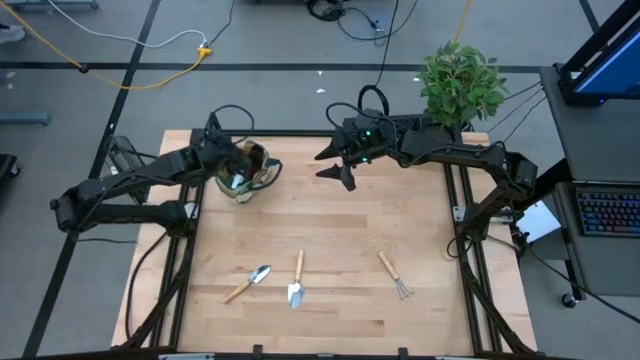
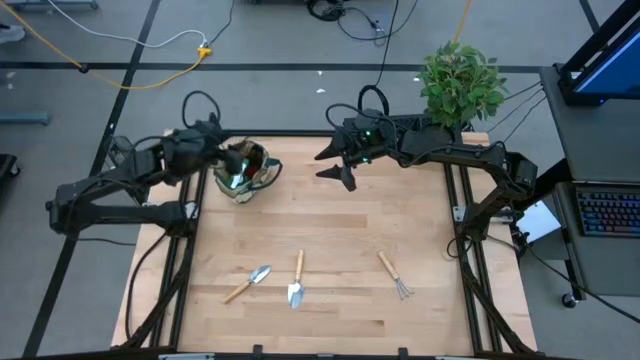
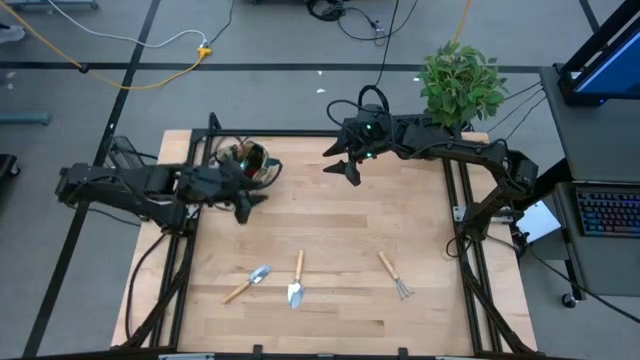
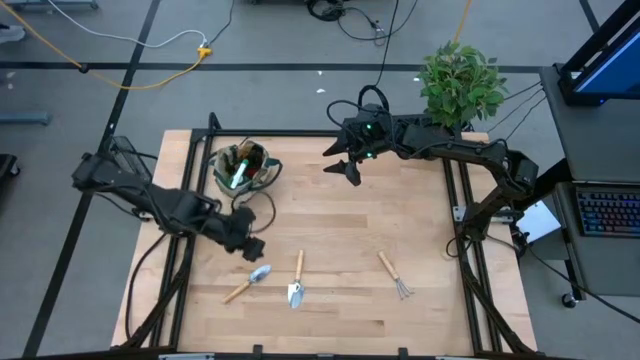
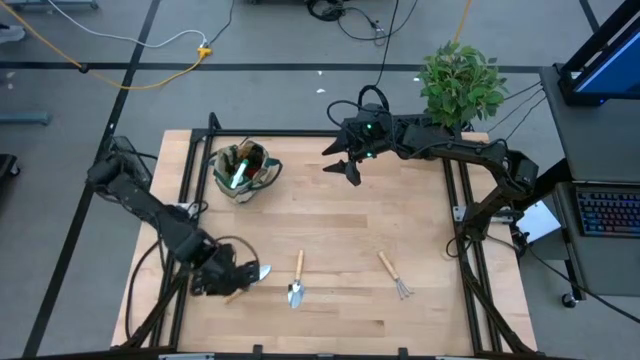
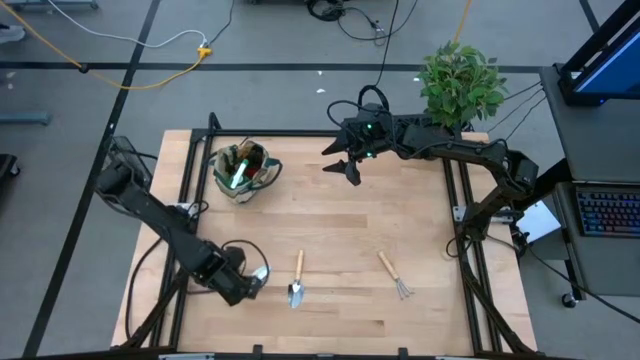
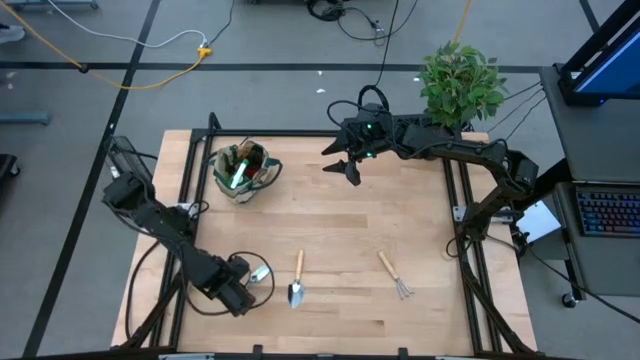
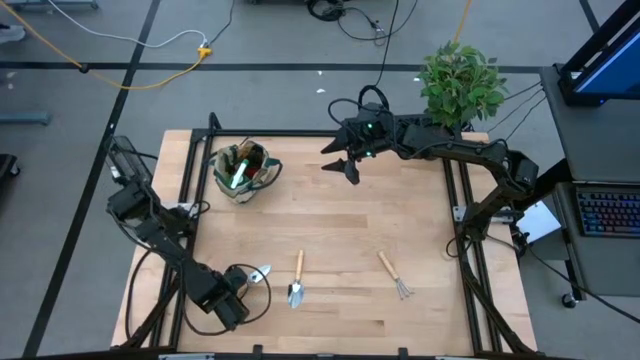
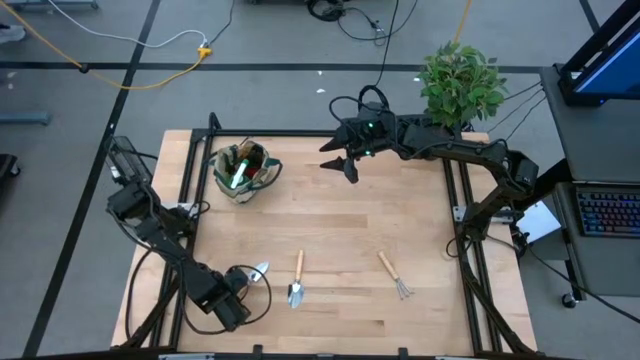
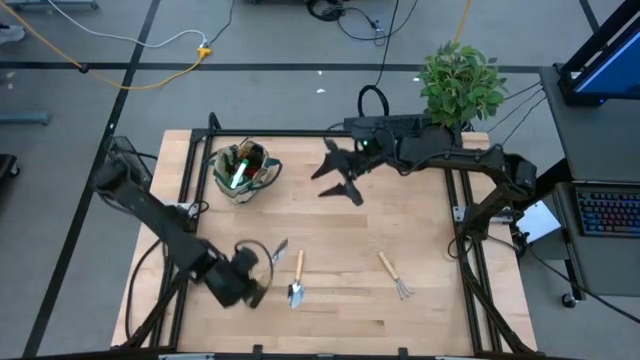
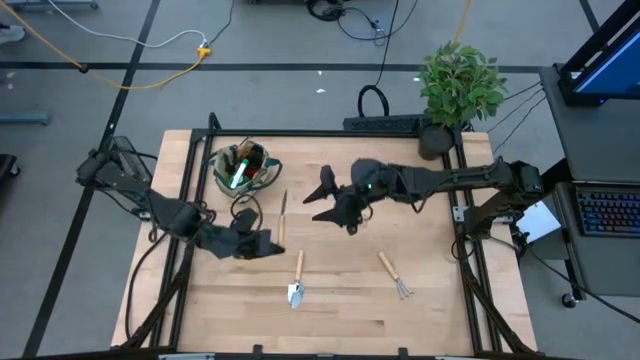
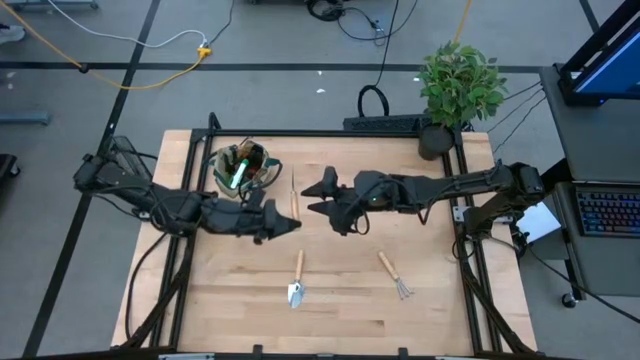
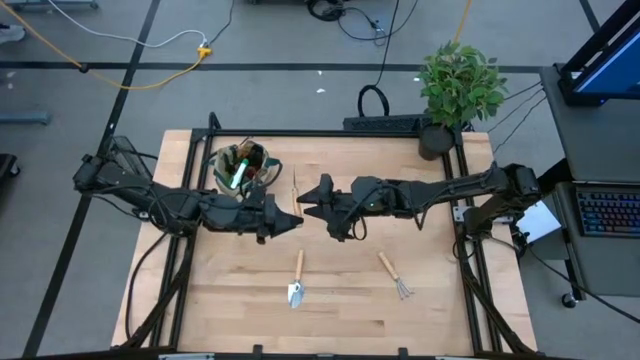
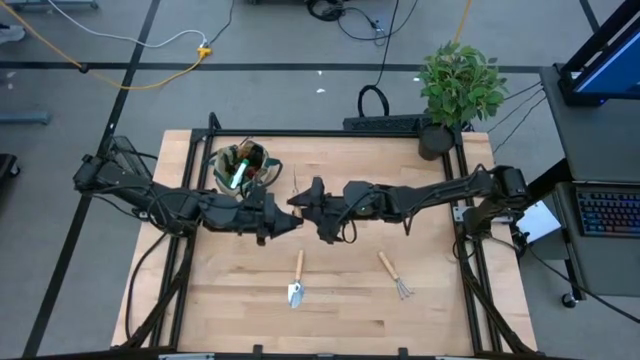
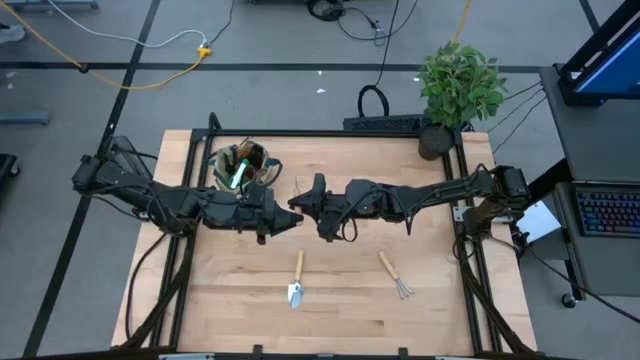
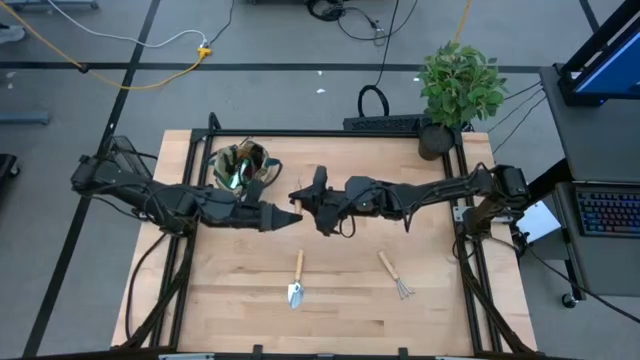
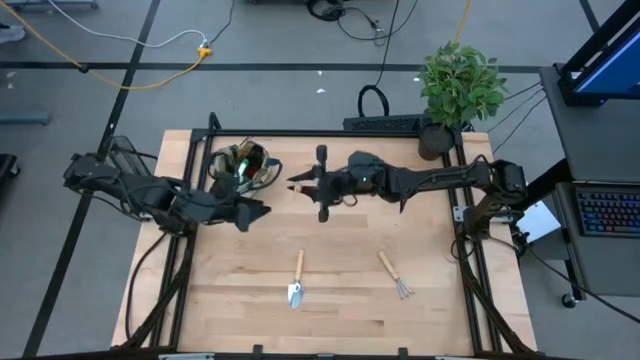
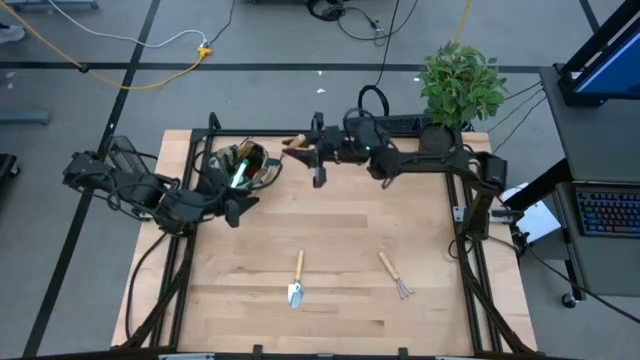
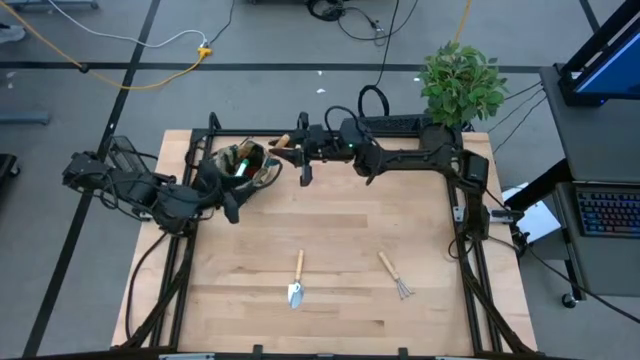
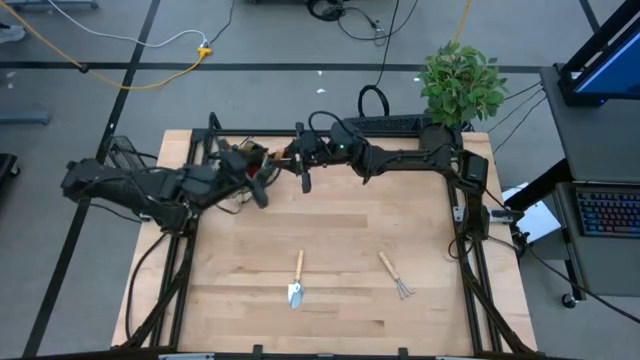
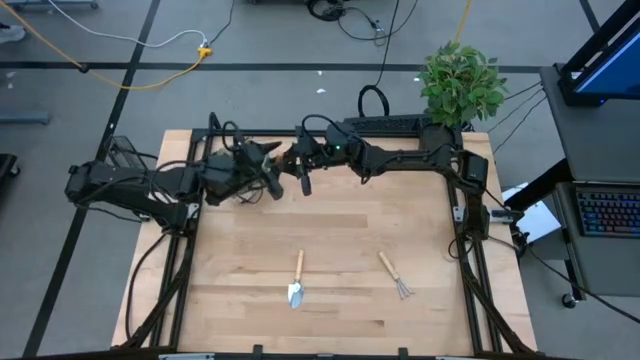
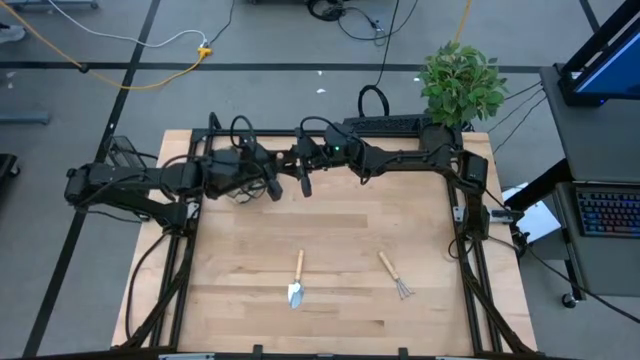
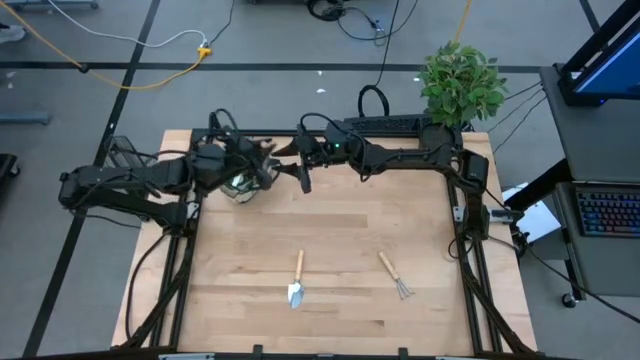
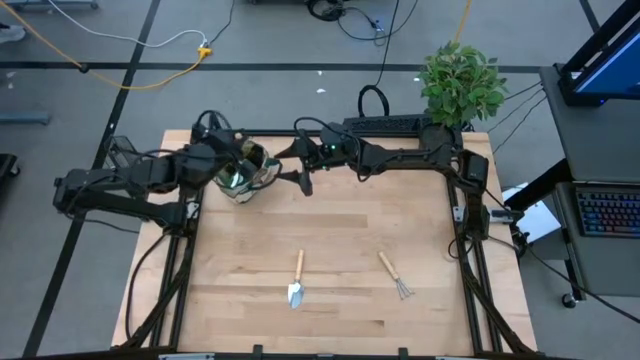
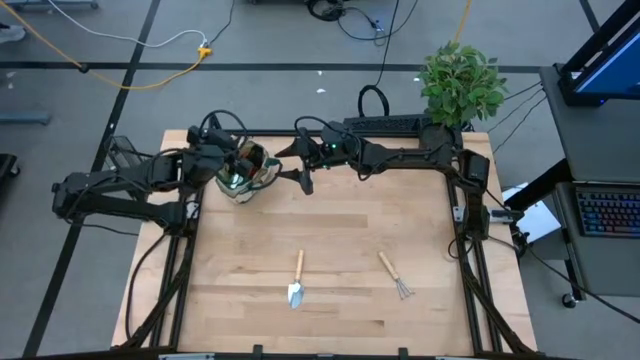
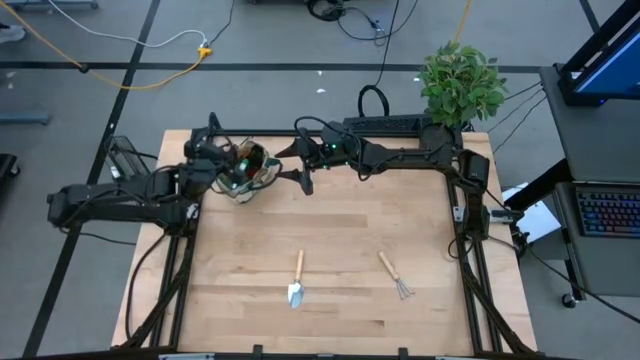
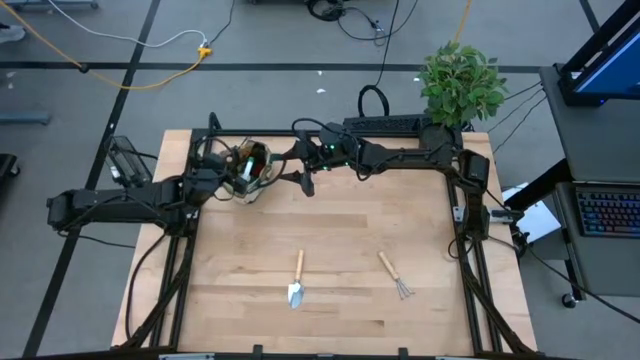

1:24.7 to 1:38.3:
Task: Pick & Place Garden tools in Gardening bag
Put the left trowel into the gardening bag

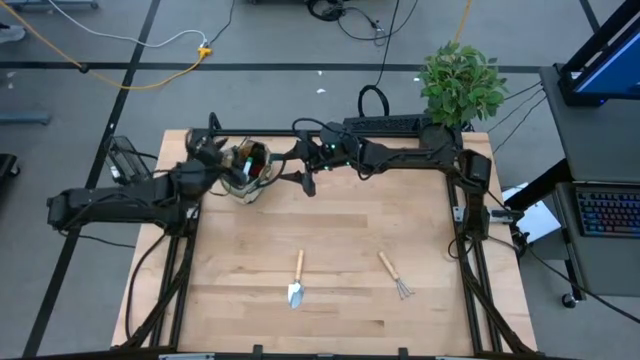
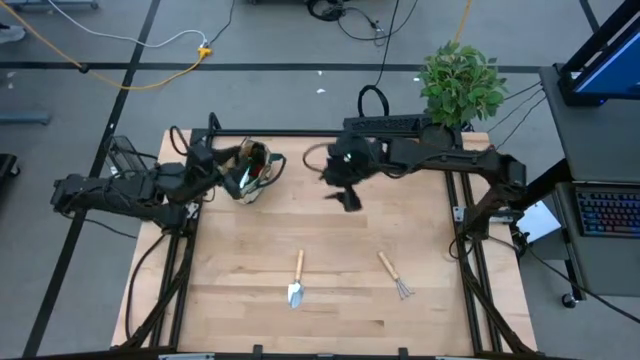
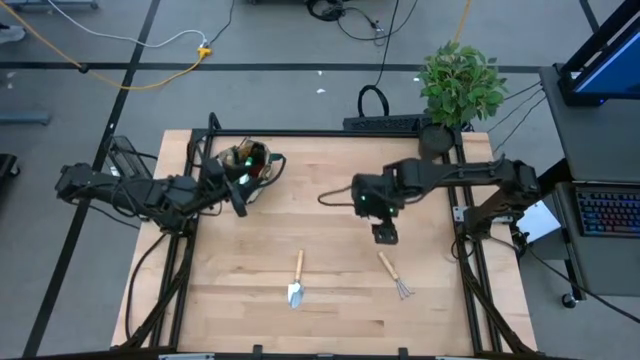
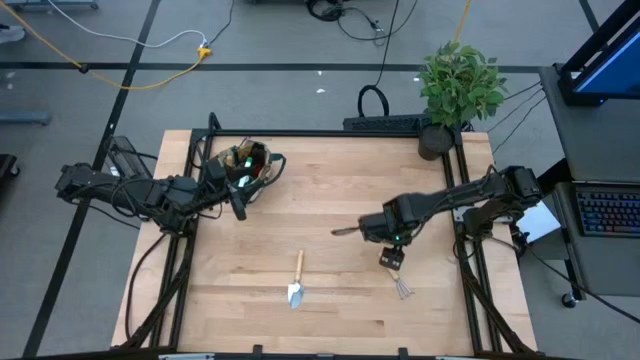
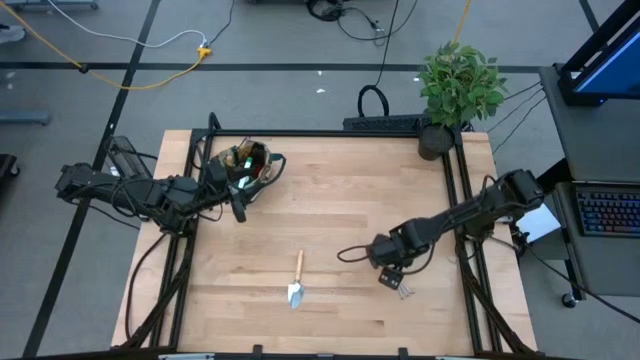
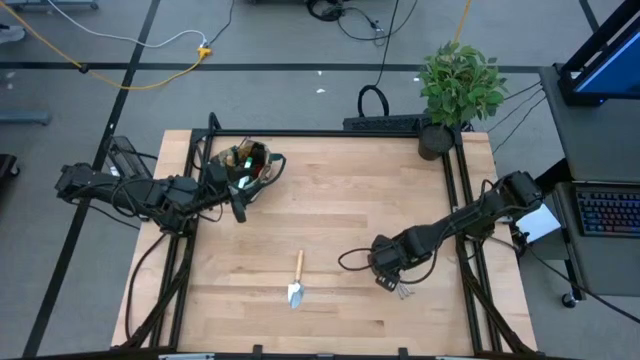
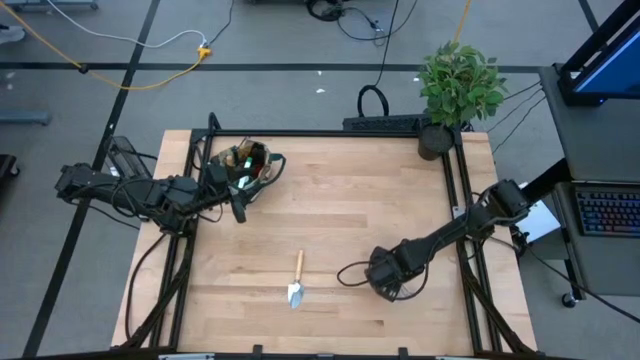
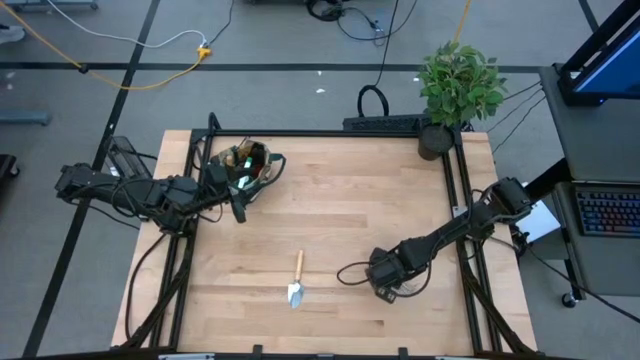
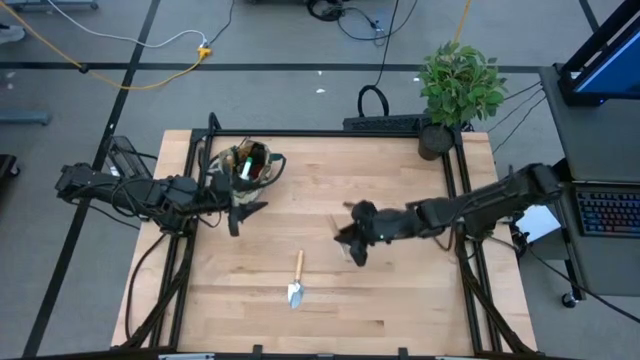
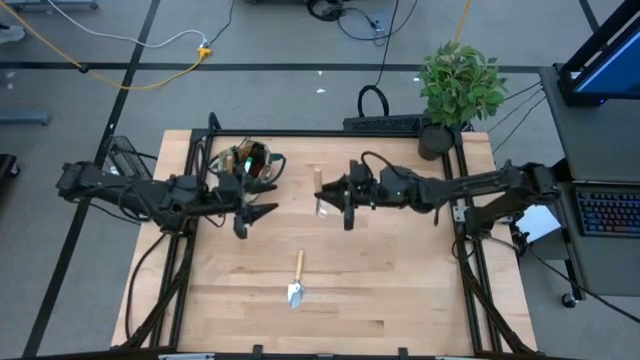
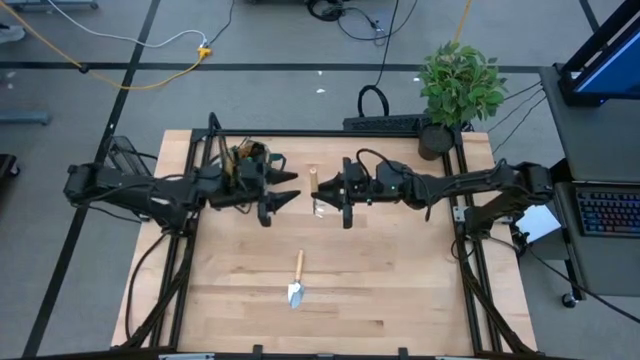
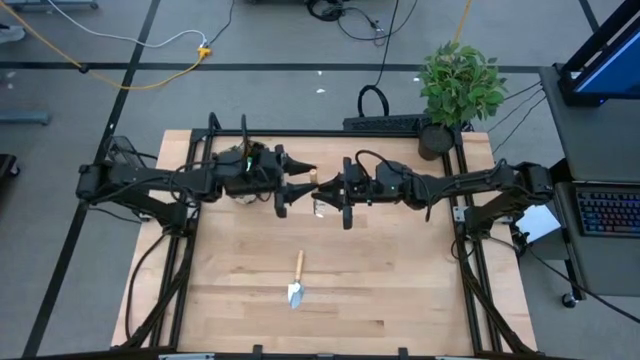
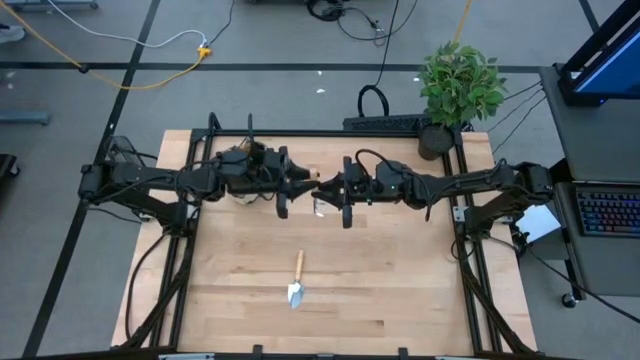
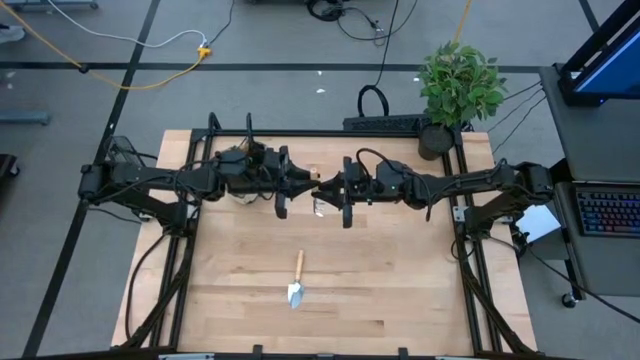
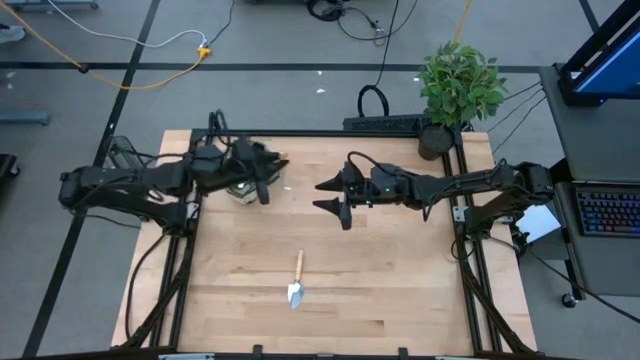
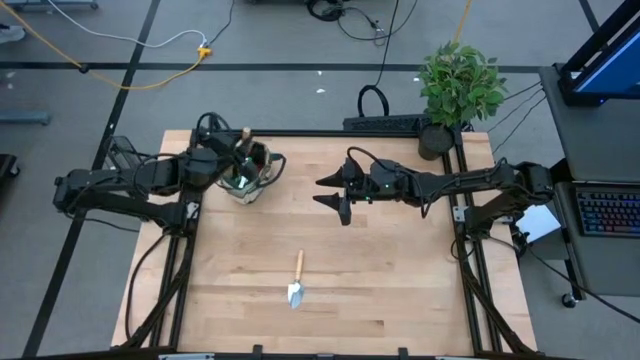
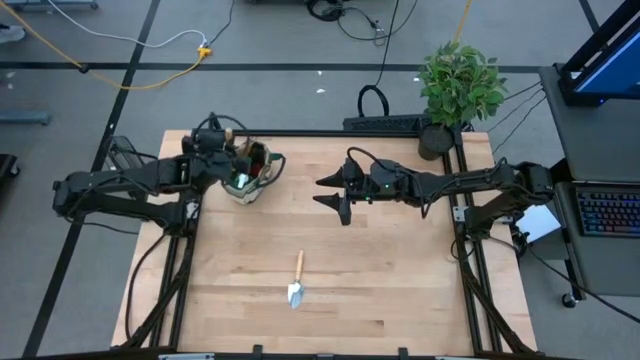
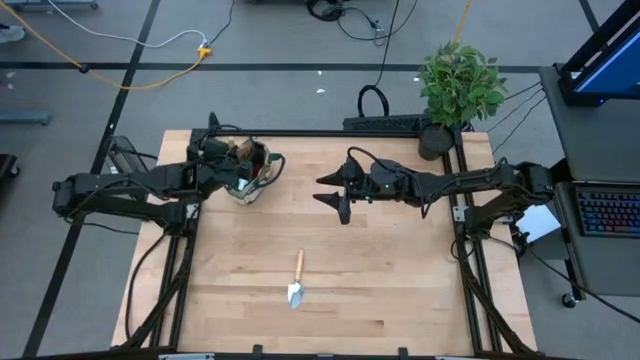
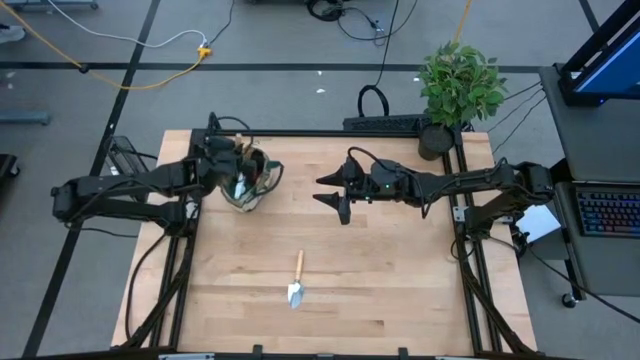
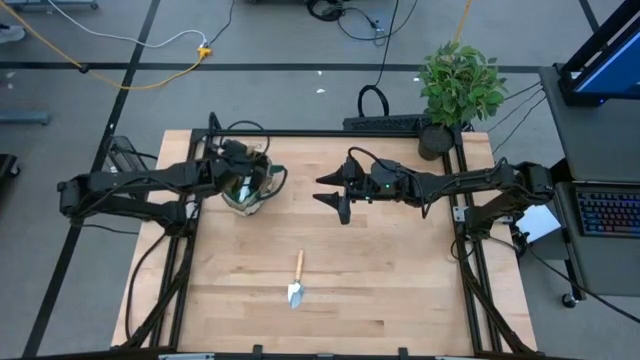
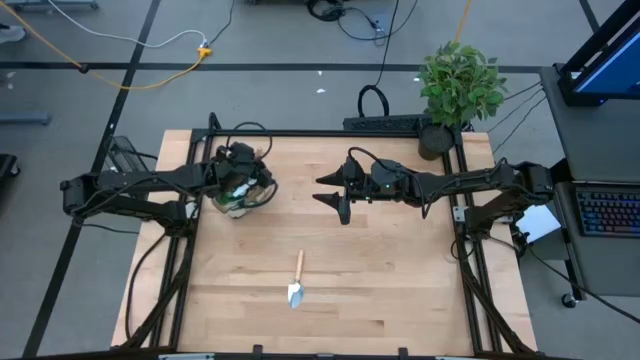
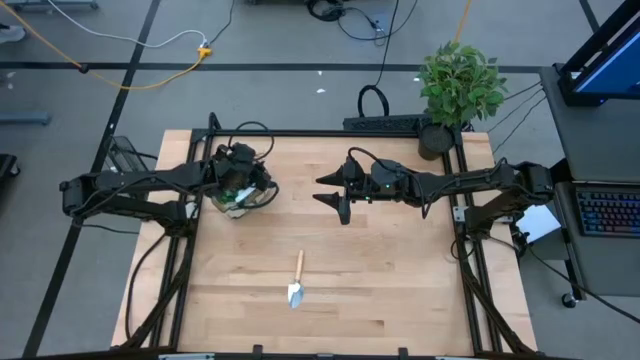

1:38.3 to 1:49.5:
Put the hand rake into the gardening bag
